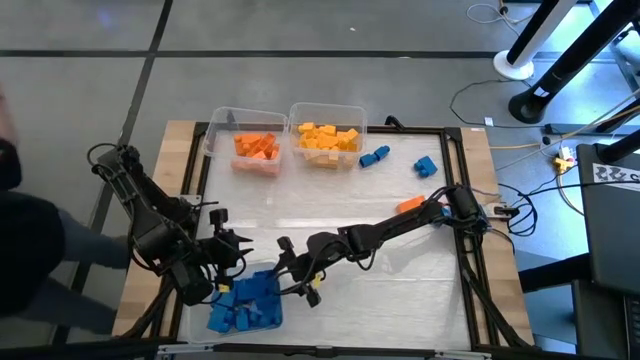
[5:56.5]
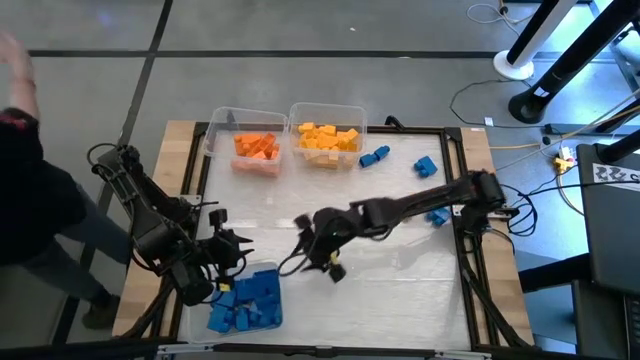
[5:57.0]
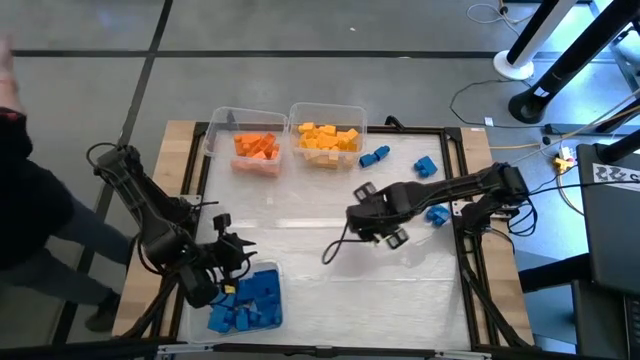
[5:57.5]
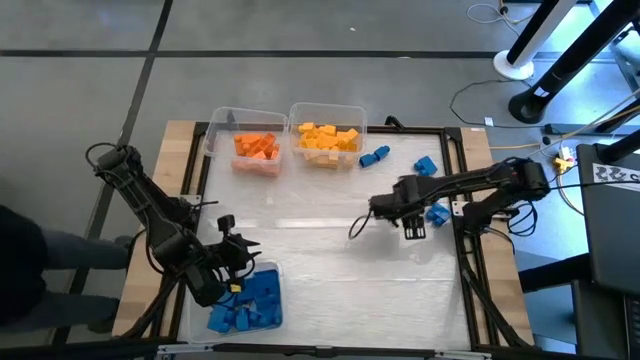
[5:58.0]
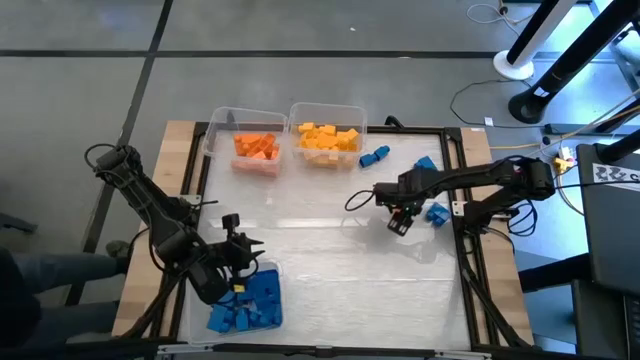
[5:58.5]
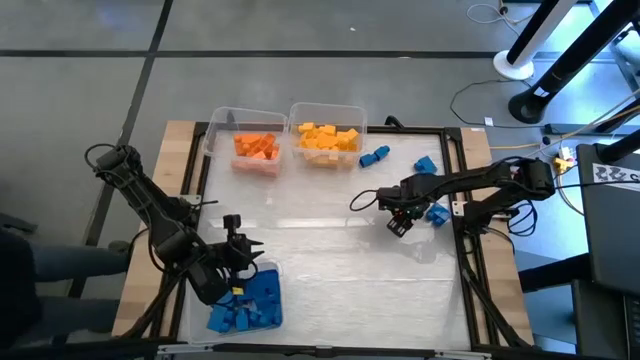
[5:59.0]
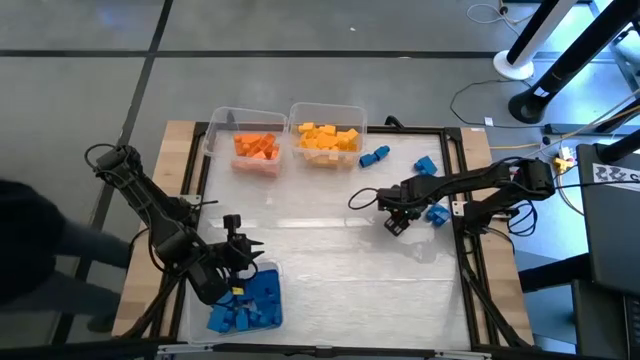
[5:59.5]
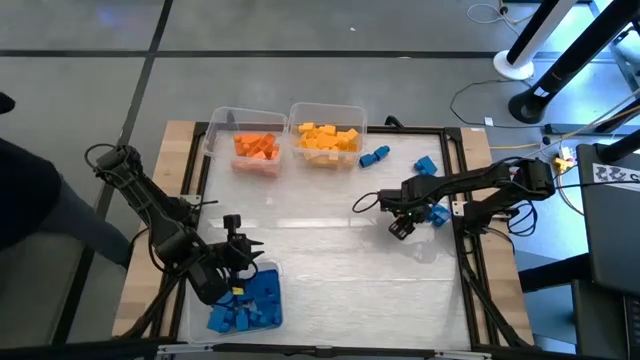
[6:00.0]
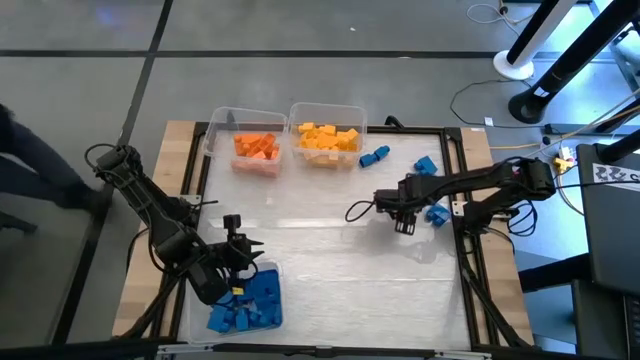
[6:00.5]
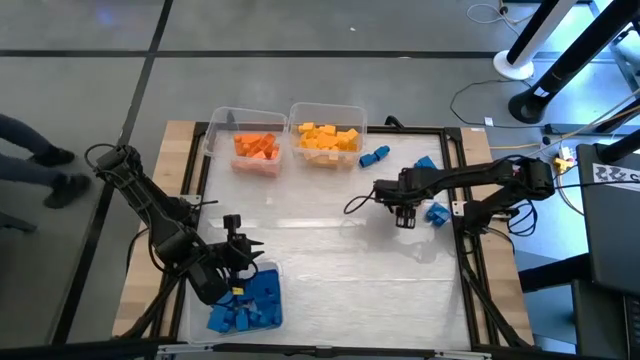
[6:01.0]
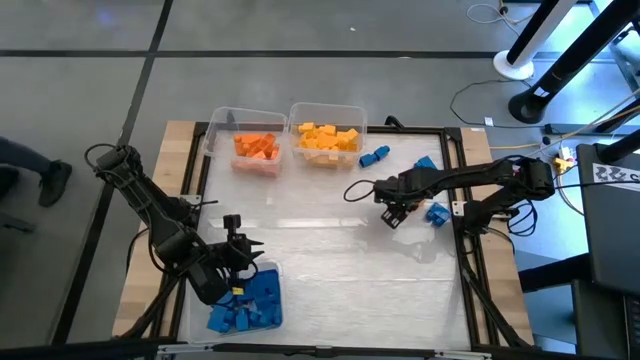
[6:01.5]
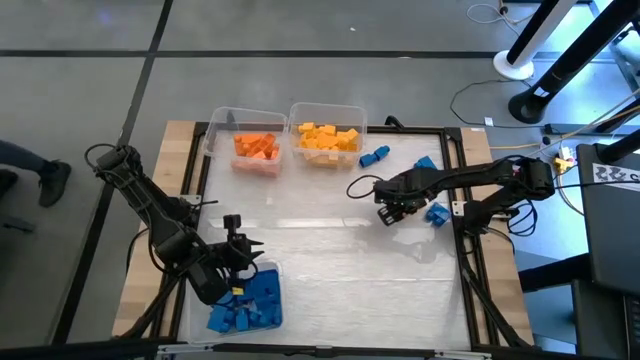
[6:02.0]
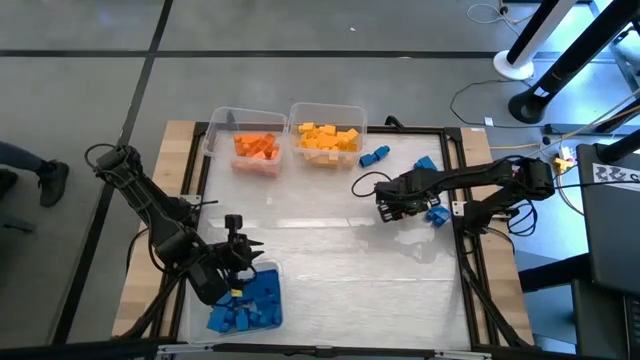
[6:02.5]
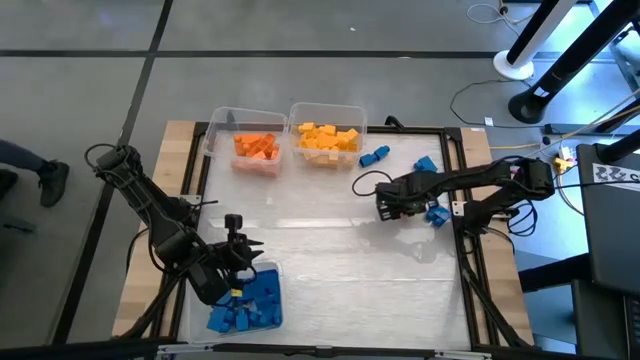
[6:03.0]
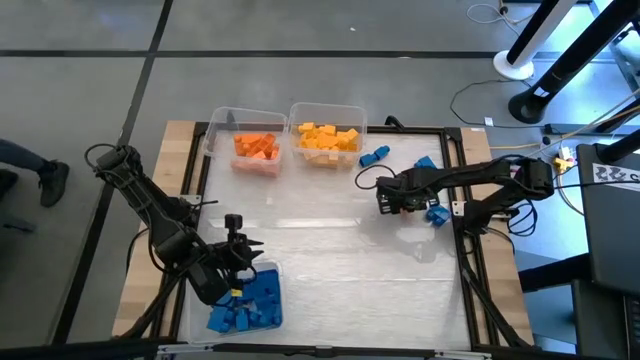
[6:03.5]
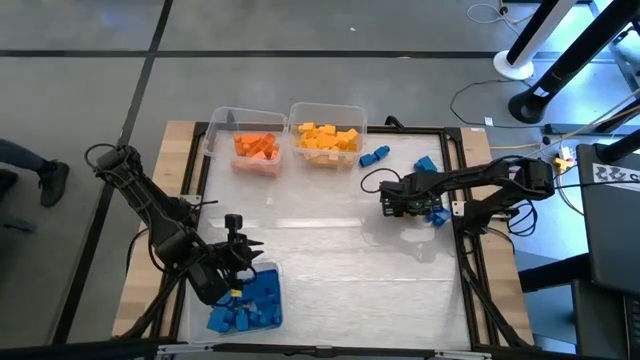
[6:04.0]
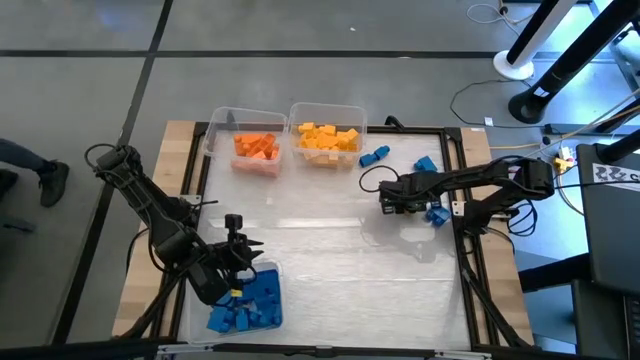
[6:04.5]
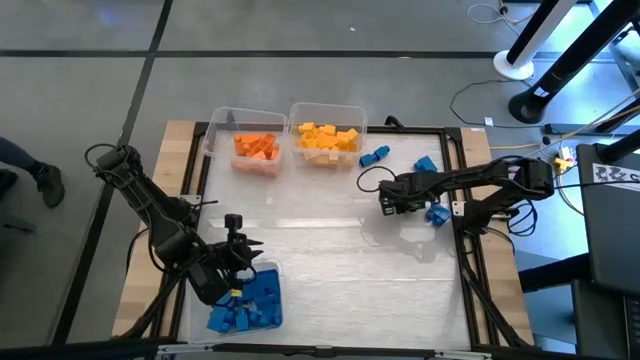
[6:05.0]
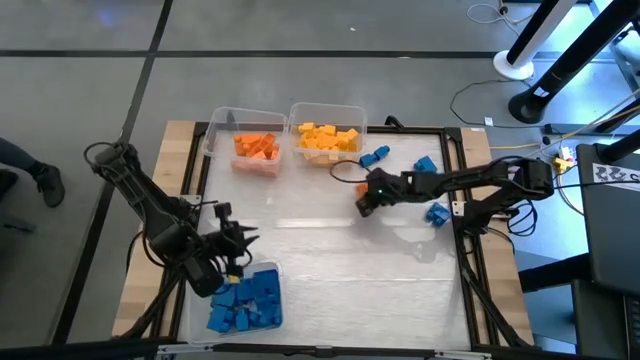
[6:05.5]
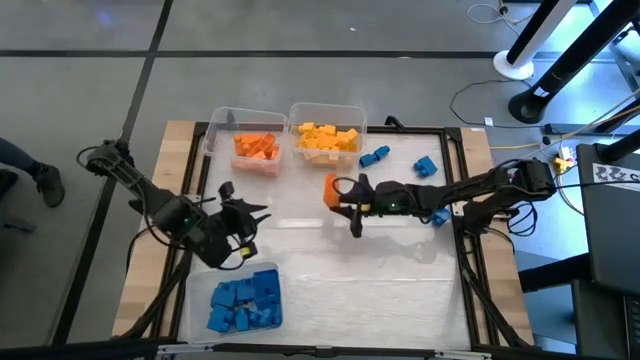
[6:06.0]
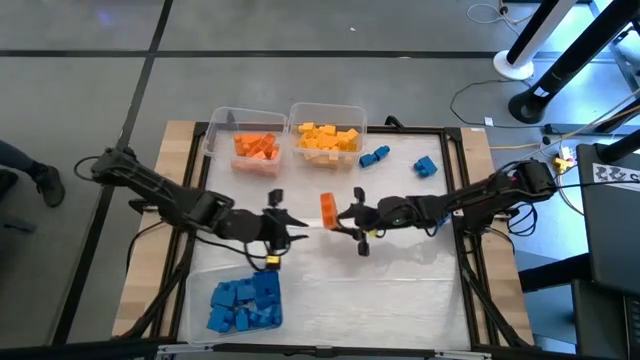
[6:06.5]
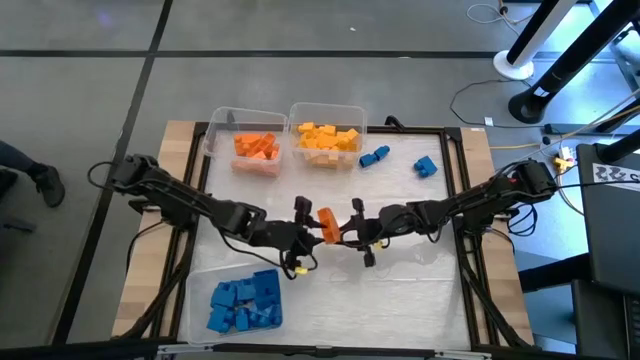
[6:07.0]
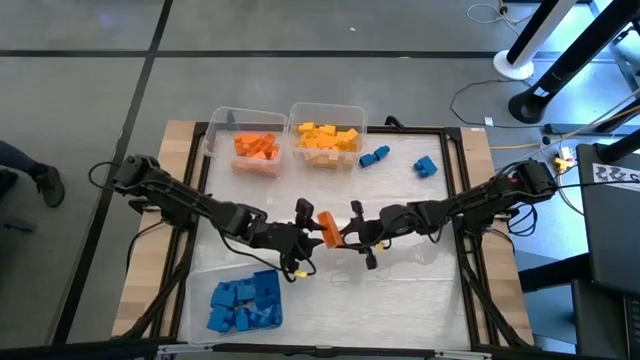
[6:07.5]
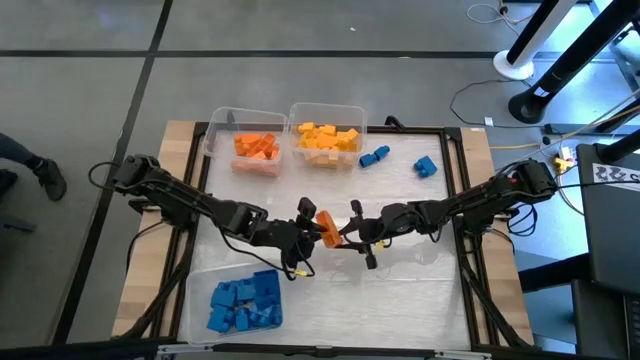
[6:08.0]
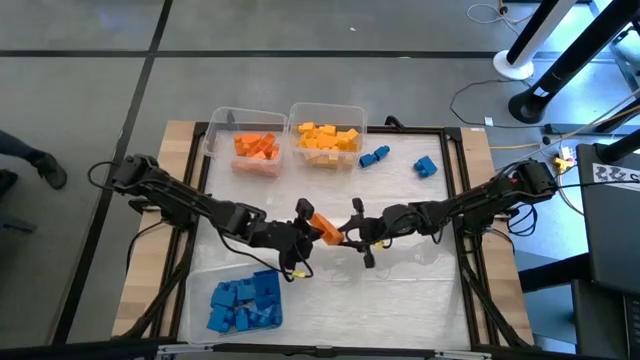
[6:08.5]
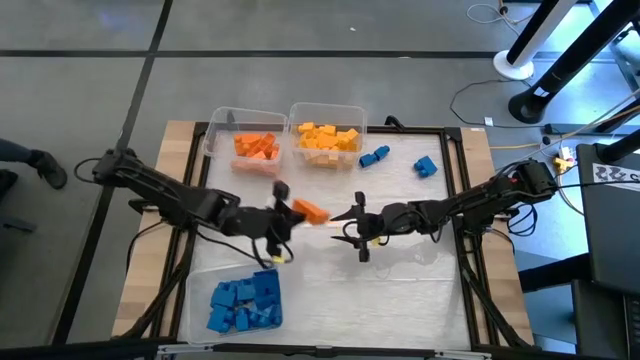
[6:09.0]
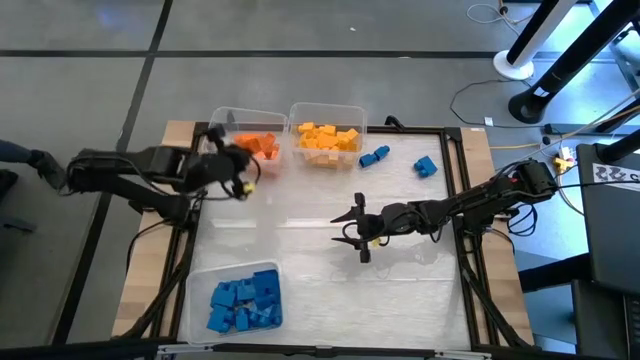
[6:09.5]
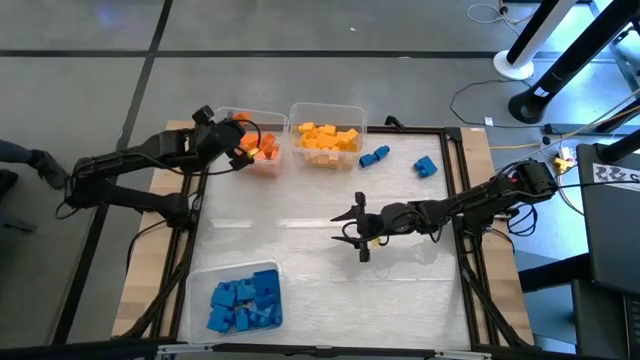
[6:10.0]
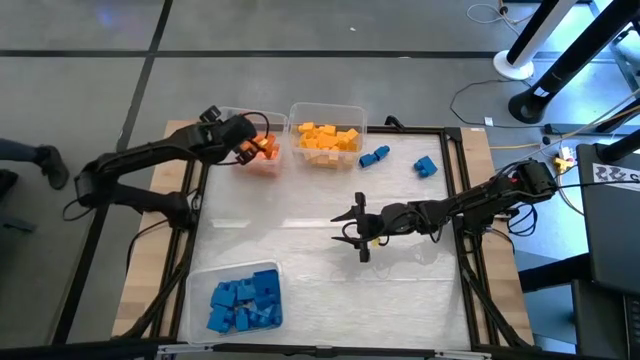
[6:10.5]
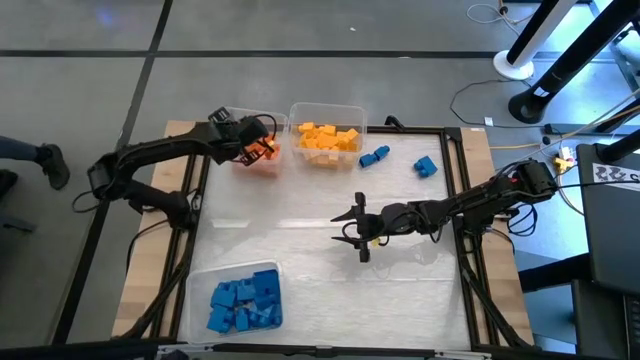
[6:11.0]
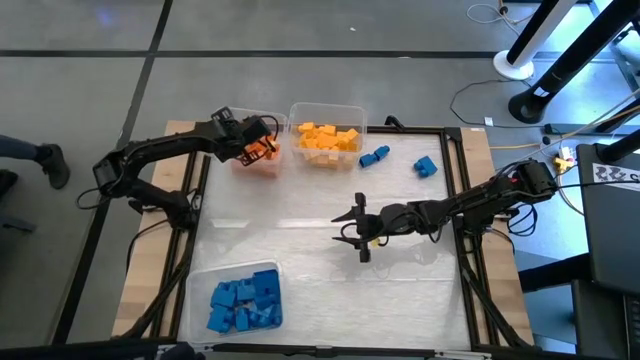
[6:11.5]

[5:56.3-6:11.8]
Task: Sort blocks
Put the orange game piece into the top left transparent bin

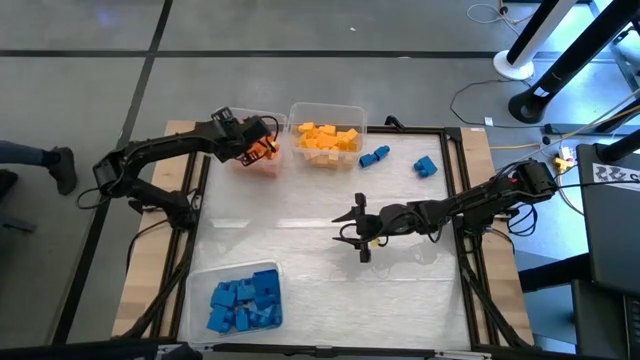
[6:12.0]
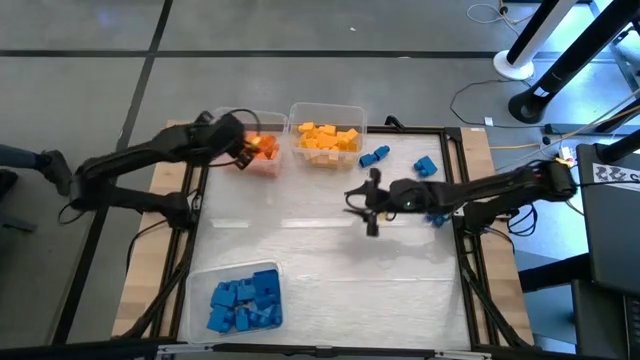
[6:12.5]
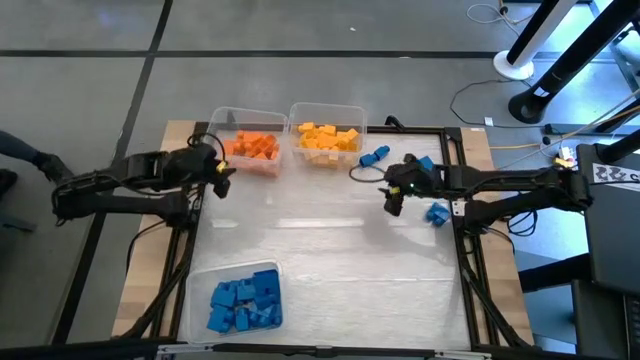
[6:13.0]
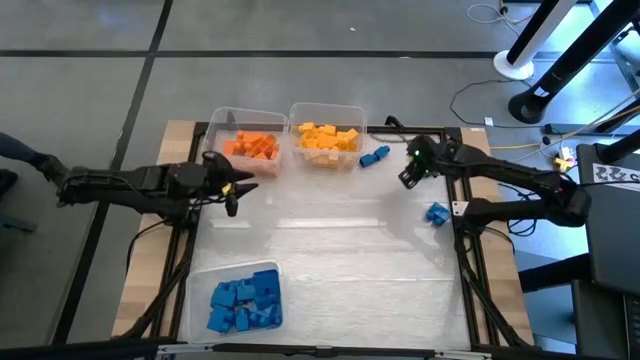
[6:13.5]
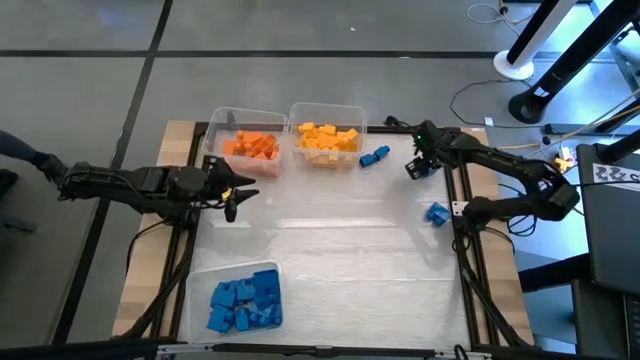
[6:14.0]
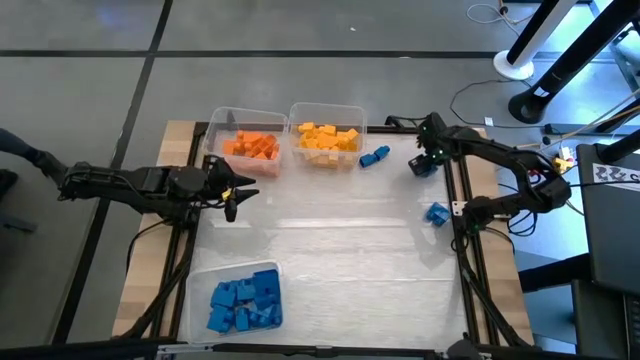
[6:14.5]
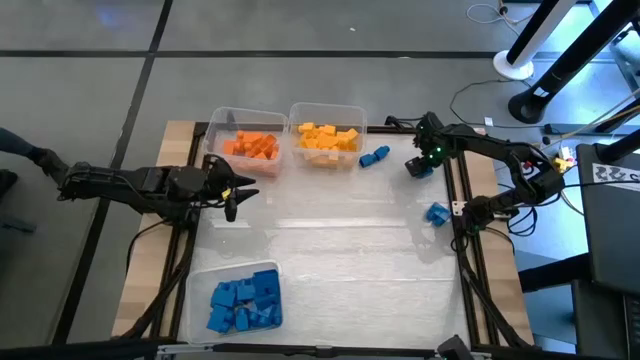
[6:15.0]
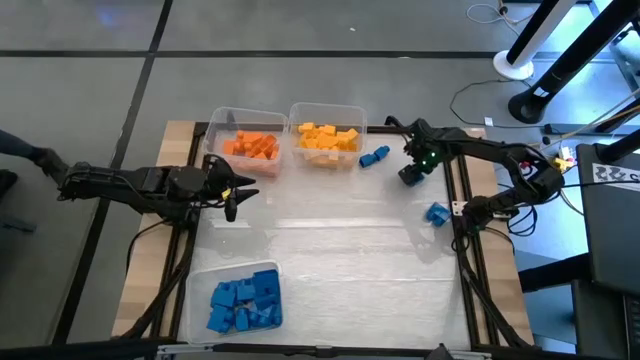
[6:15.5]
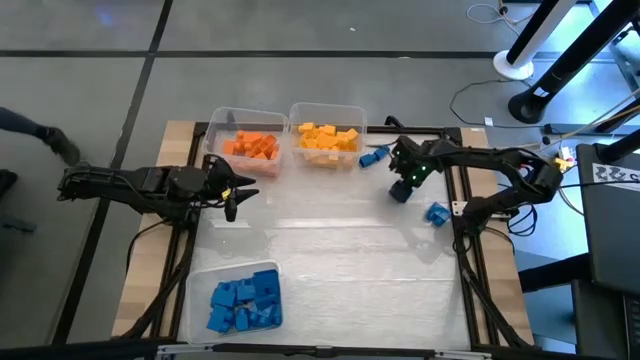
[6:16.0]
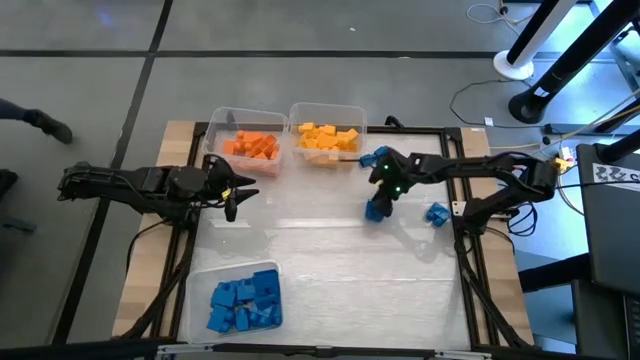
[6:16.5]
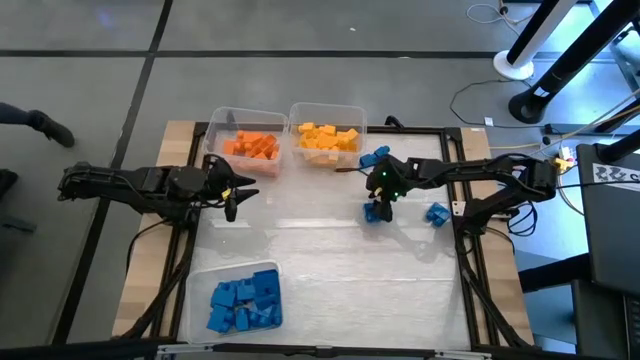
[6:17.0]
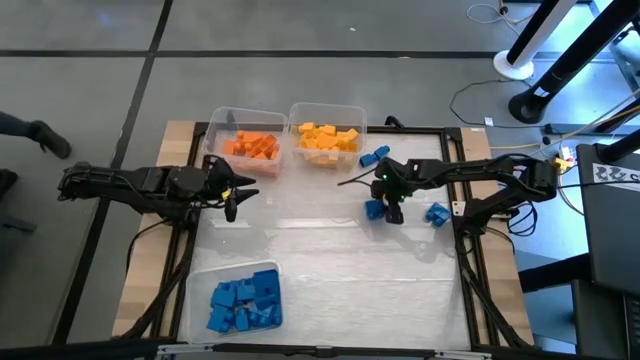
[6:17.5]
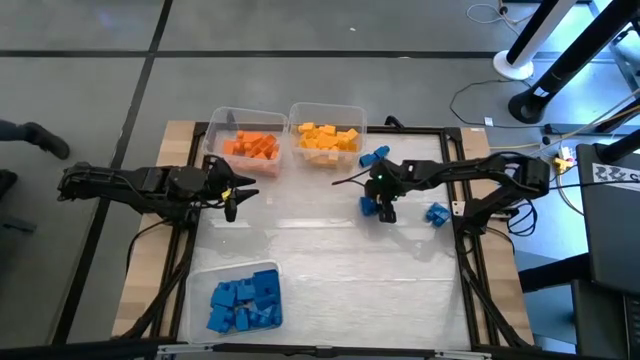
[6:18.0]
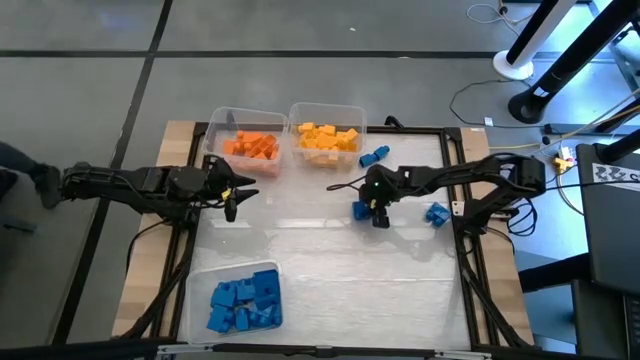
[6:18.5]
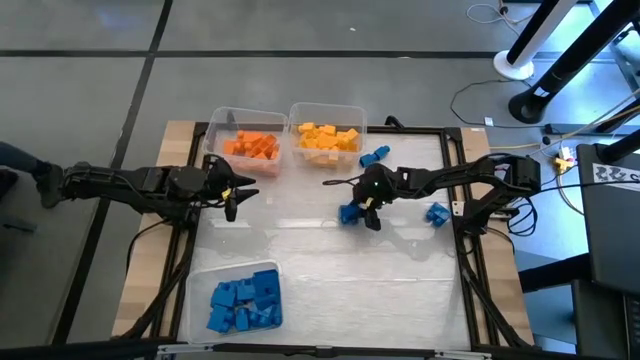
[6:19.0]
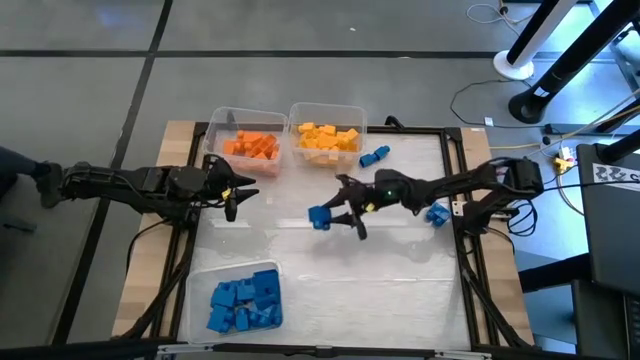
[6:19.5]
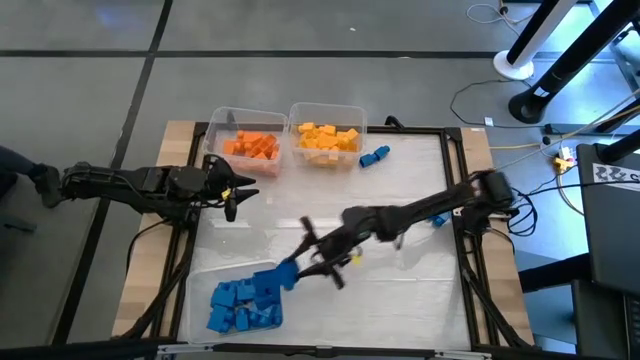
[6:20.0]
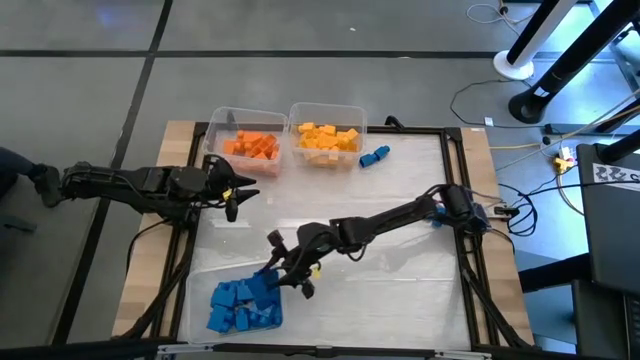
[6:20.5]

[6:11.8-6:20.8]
Put the blue game piece into the bottom transparent bin
